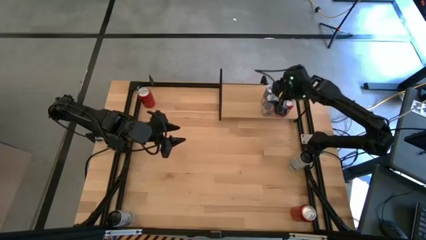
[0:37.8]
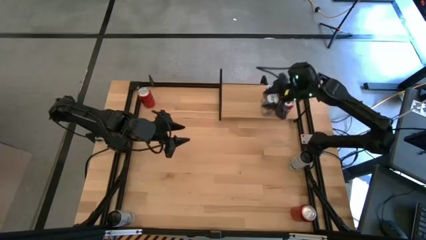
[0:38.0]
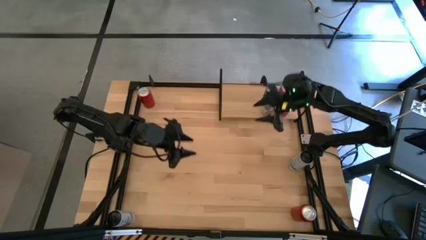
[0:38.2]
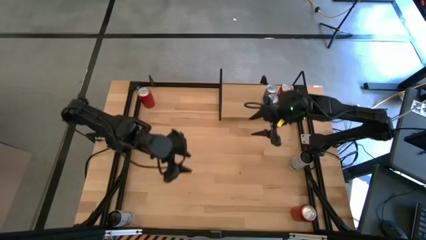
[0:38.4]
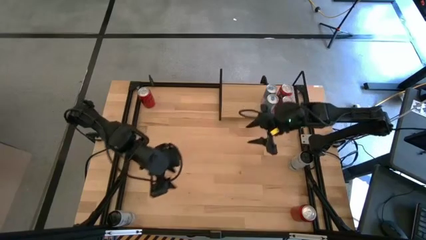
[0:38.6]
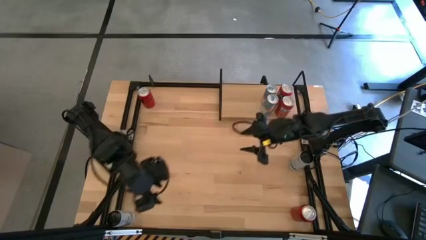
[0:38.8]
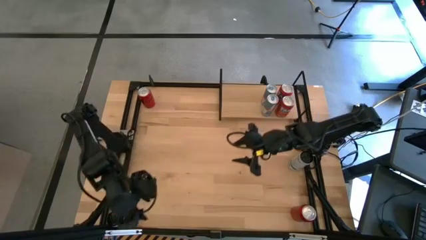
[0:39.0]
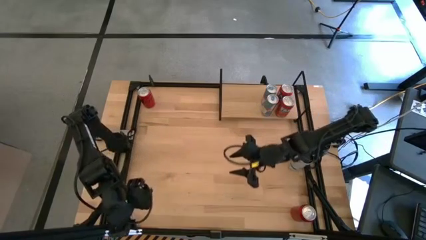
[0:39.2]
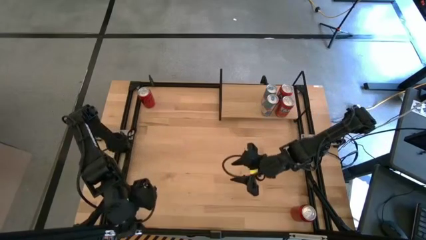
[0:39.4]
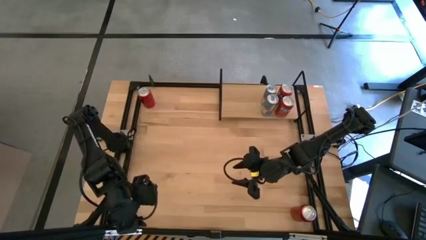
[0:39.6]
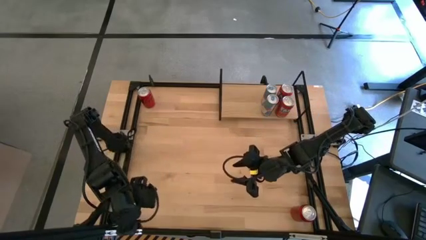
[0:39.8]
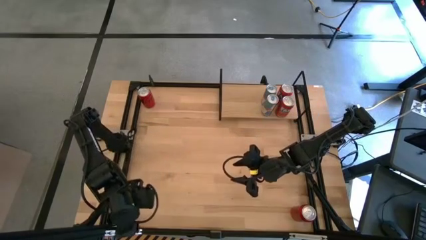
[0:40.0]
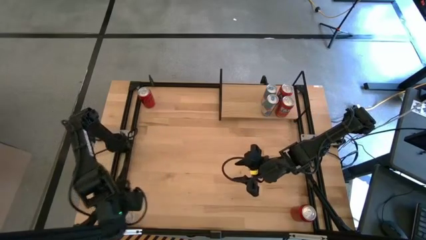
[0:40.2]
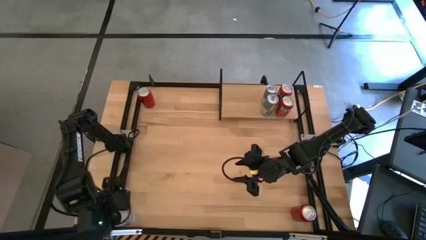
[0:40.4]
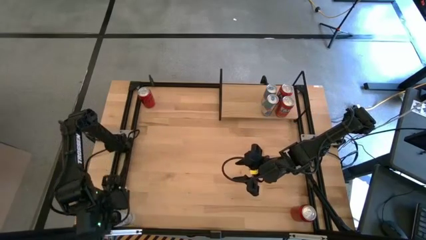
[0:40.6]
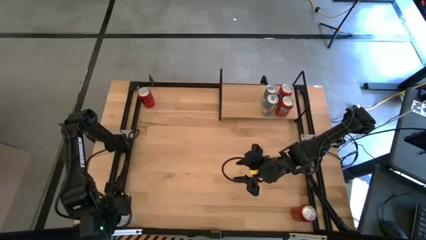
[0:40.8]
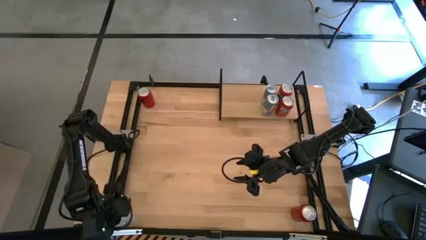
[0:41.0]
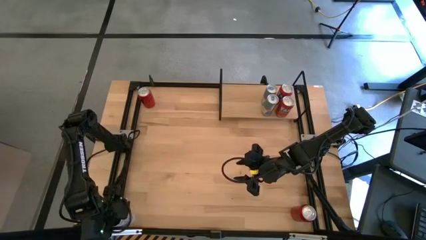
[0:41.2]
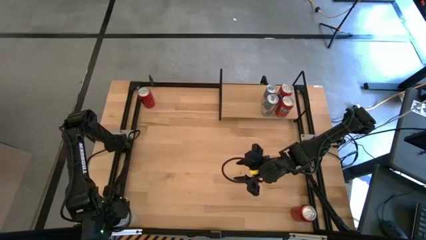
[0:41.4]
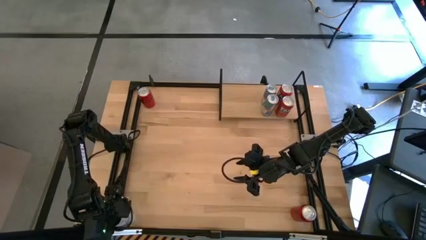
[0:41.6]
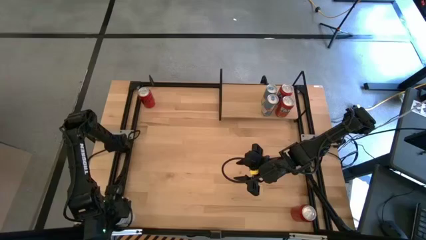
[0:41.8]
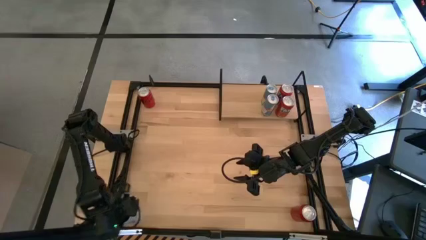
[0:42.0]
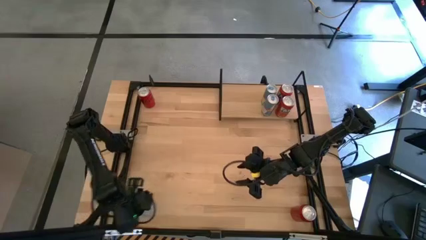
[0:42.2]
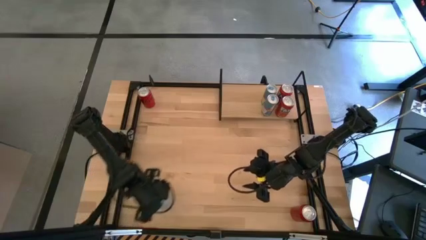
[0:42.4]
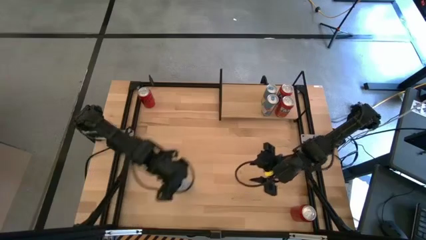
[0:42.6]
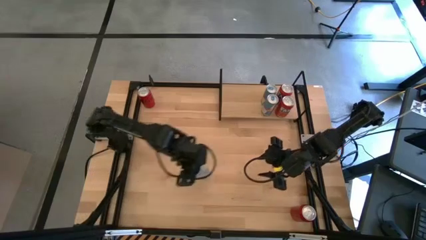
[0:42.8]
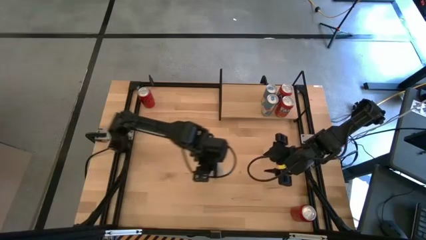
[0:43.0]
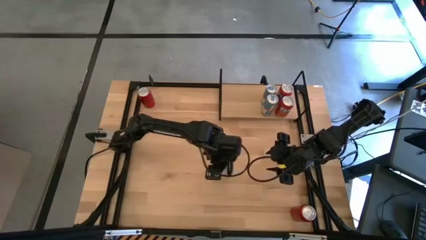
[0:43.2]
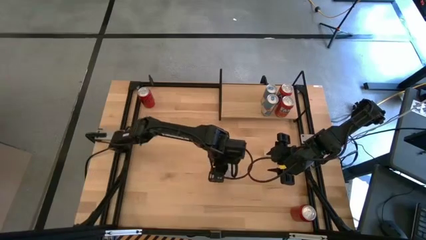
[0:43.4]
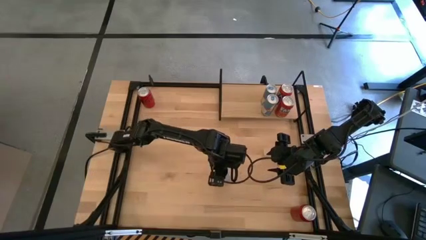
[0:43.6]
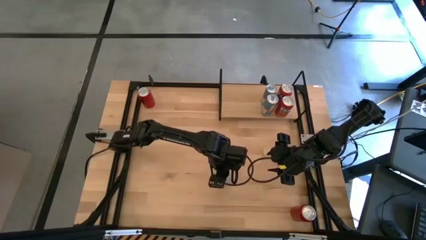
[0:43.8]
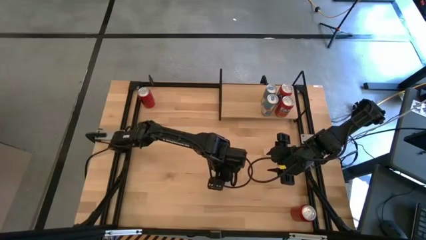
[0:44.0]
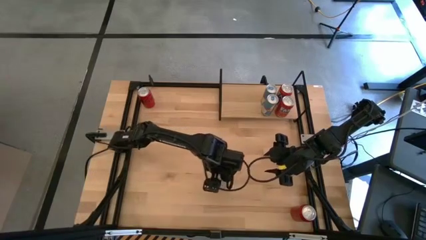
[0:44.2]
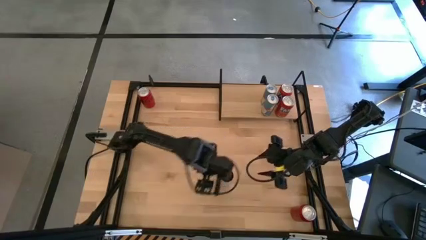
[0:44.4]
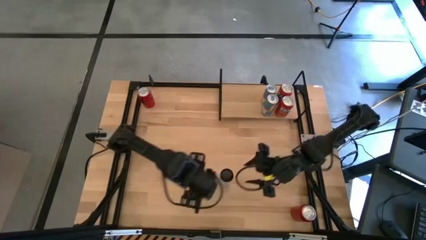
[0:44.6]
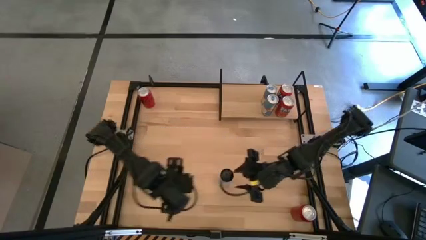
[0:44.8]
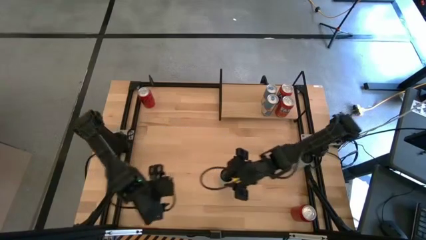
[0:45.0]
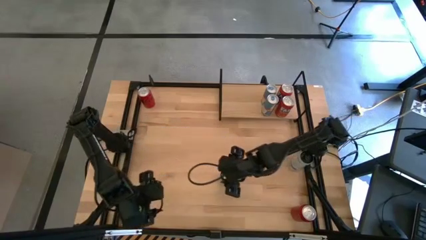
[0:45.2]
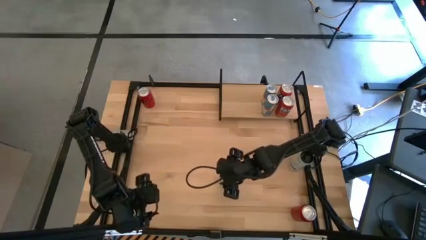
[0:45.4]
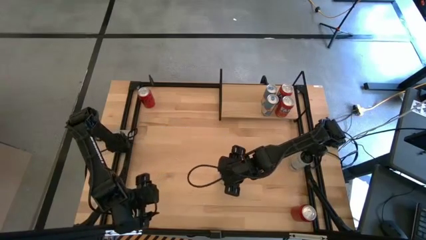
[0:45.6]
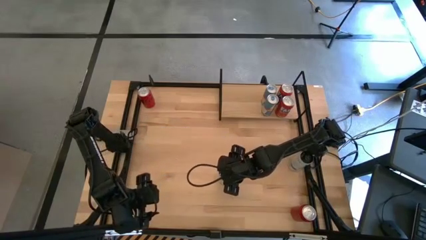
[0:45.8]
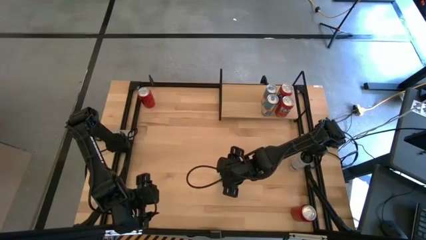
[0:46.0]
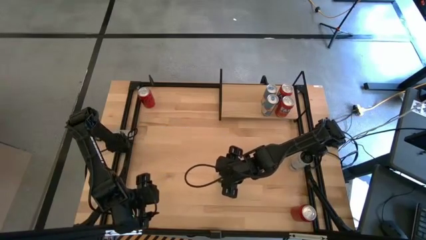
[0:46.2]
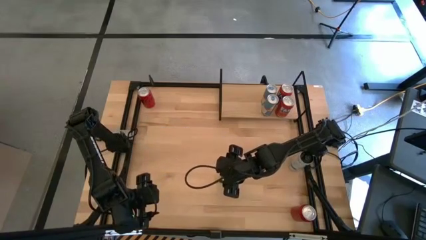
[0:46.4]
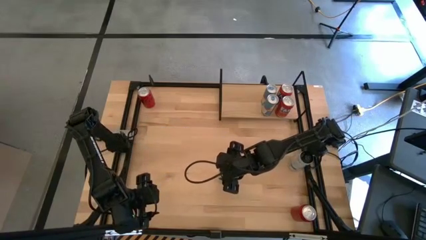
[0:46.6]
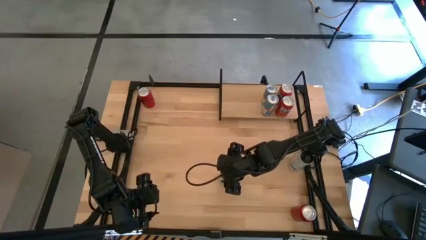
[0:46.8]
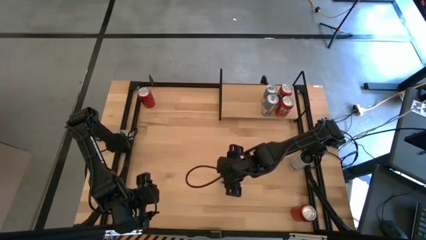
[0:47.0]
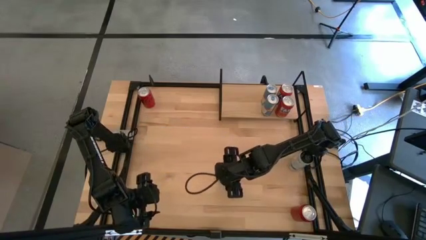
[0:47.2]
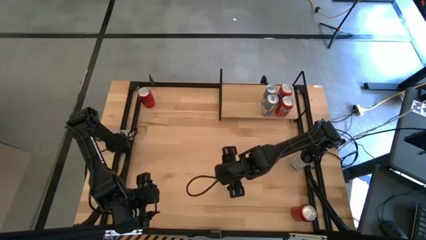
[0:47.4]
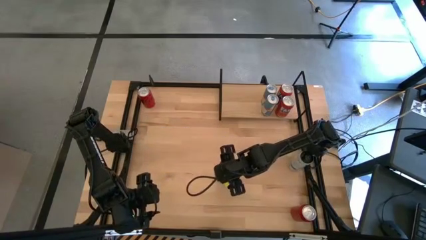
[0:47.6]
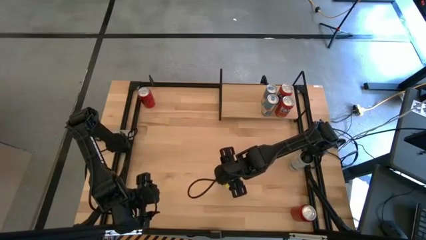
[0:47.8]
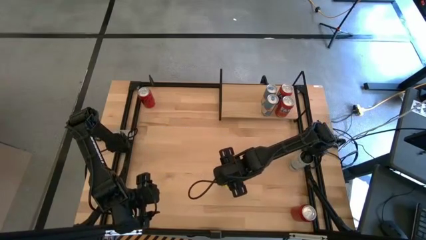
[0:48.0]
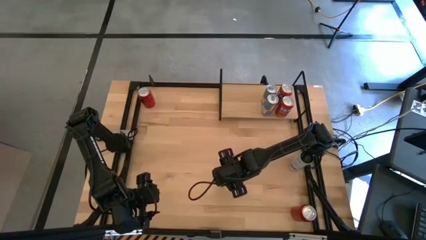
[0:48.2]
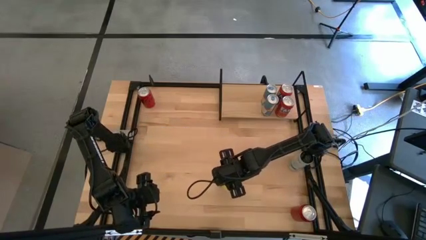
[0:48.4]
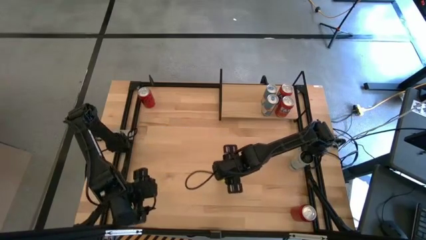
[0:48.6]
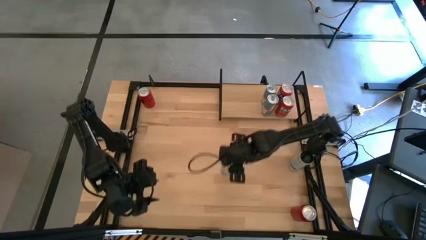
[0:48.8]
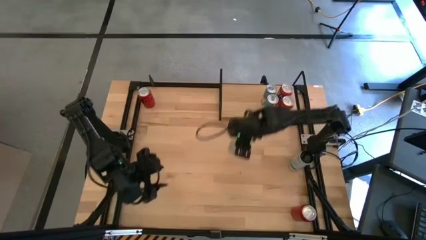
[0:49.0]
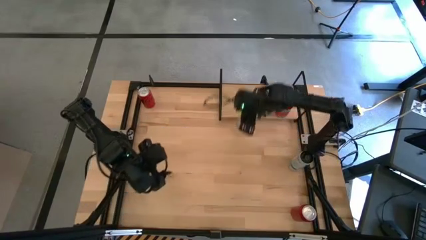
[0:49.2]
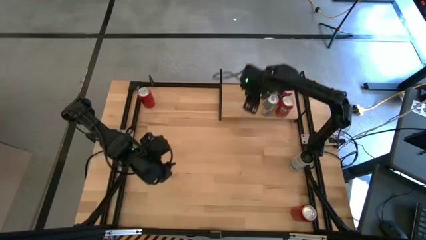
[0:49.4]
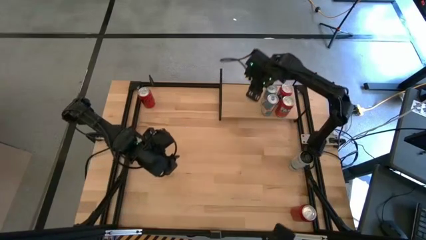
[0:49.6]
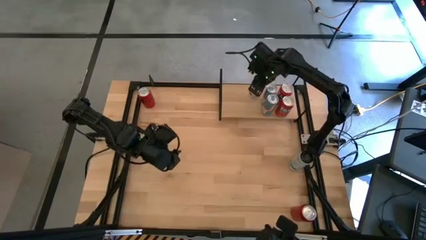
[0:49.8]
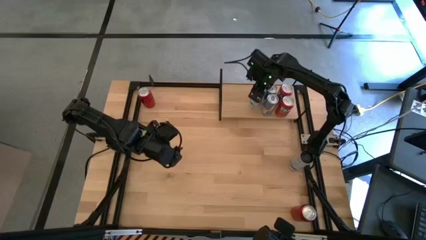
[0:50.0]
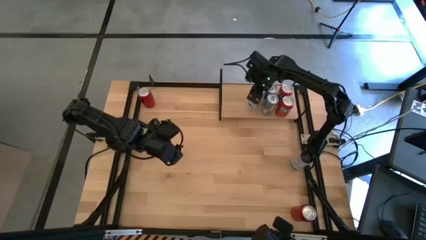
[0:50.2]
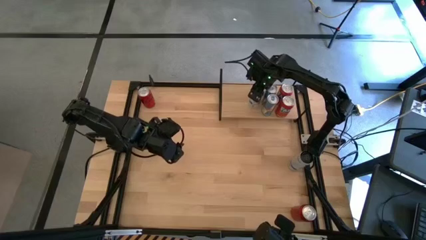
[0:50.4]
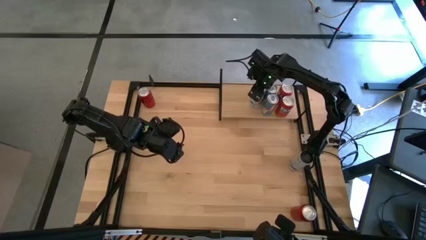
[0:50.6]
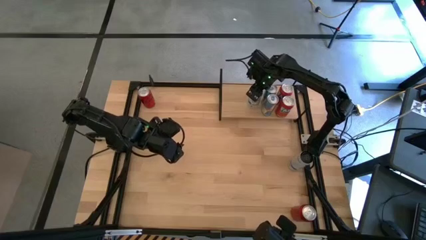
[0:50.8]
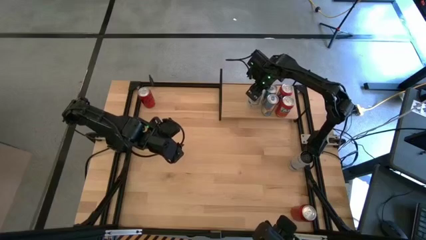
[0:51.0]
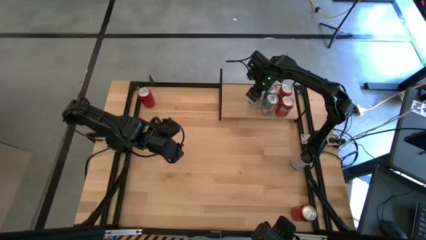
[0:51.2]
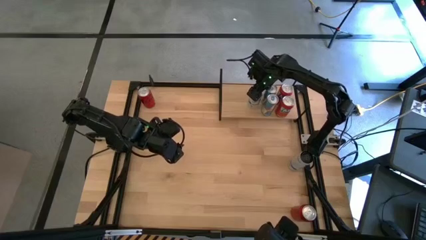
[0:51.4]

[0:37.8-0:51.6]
Task: Place canned beverage on shelf
Put the bottom white soda can on the shelf
